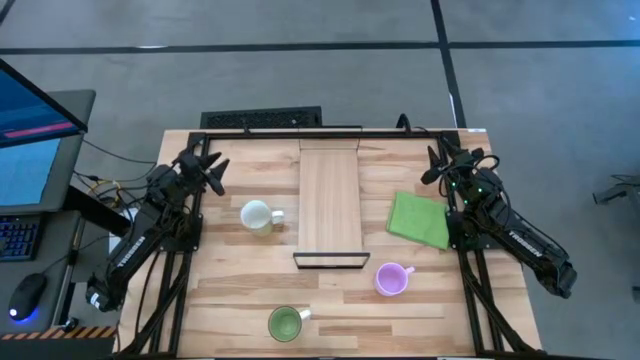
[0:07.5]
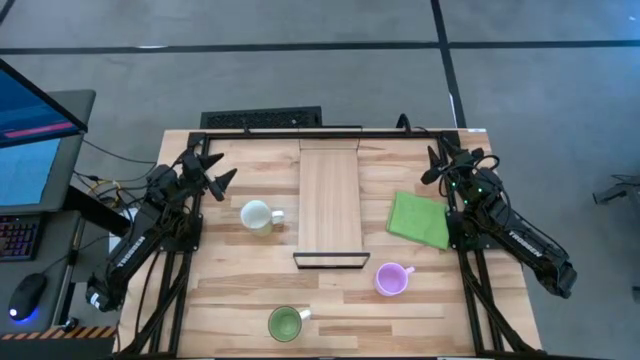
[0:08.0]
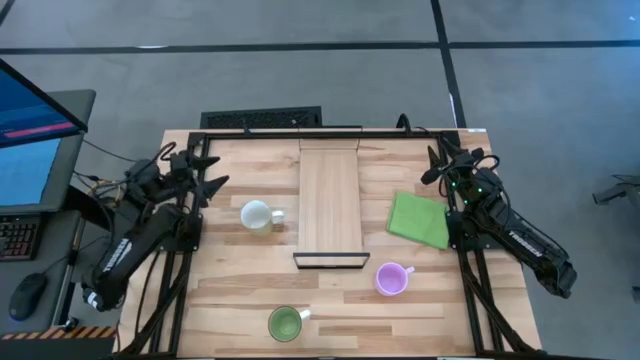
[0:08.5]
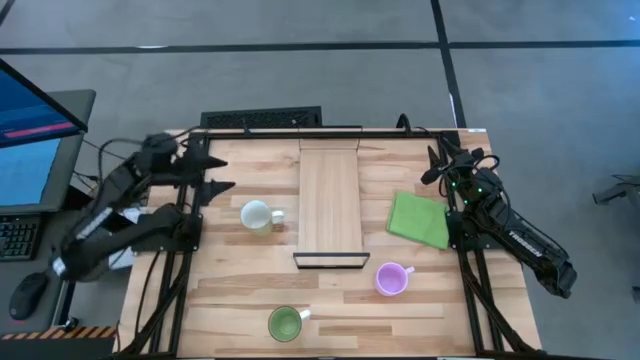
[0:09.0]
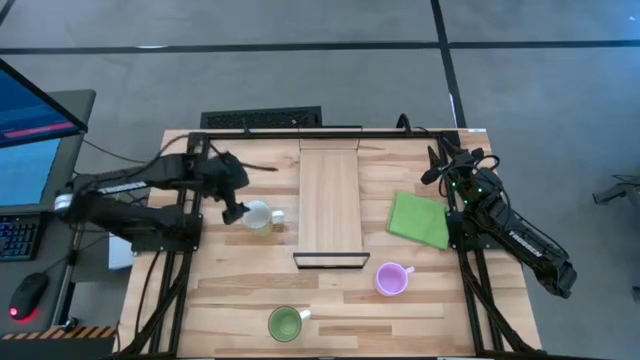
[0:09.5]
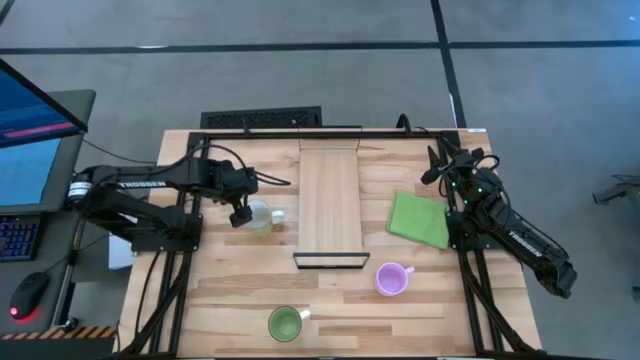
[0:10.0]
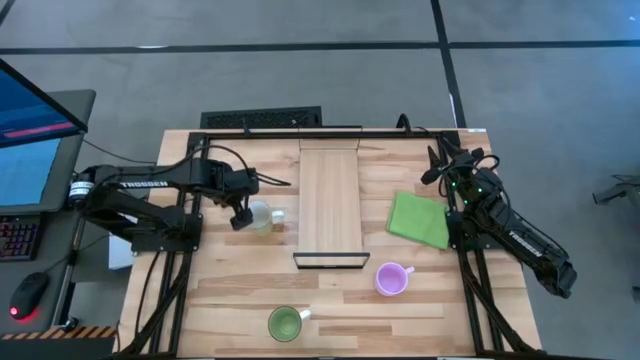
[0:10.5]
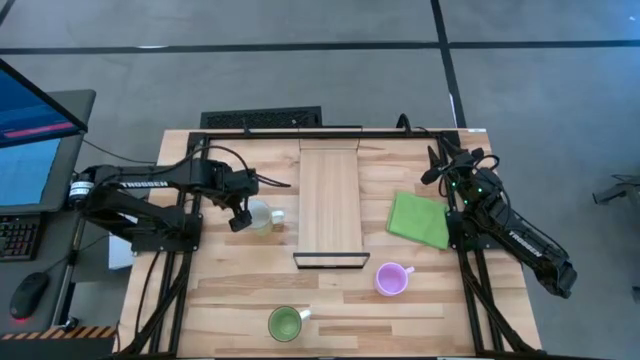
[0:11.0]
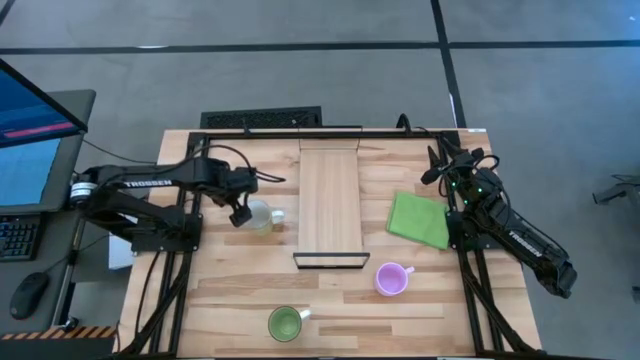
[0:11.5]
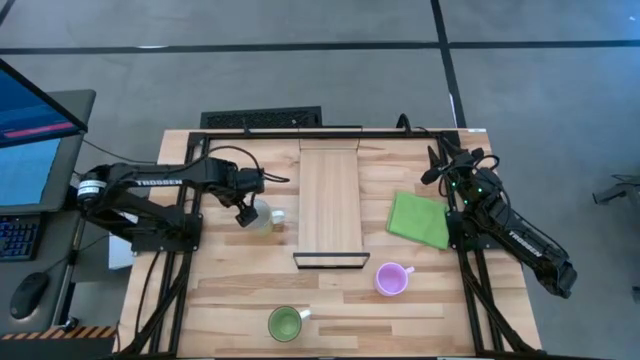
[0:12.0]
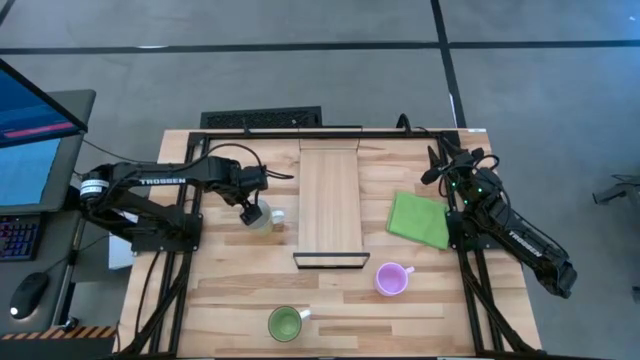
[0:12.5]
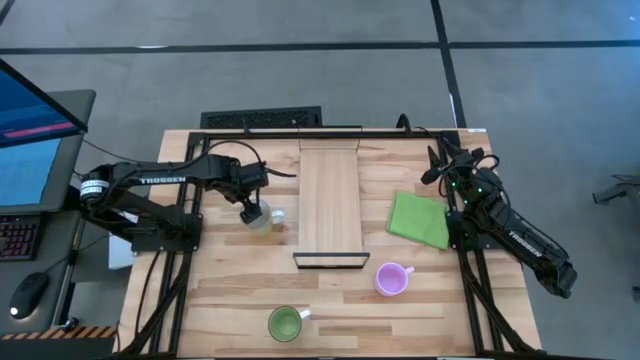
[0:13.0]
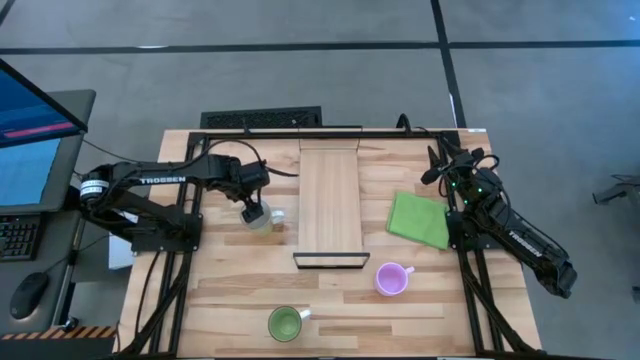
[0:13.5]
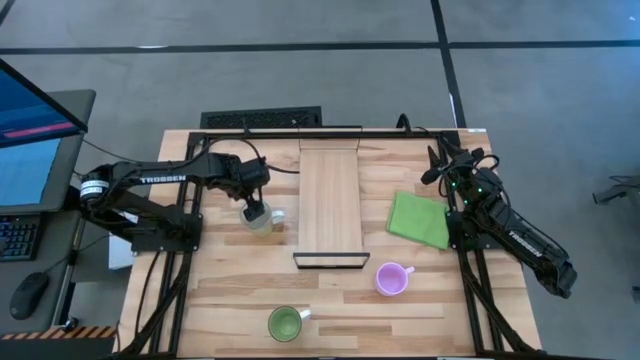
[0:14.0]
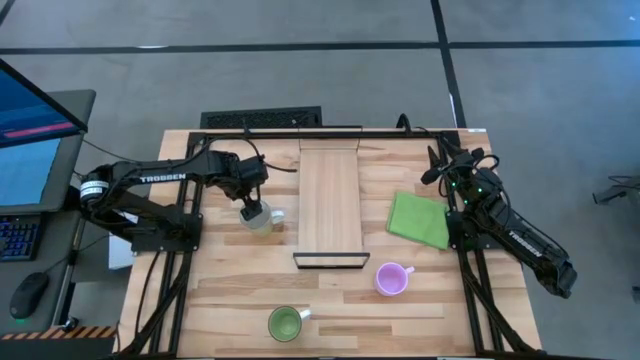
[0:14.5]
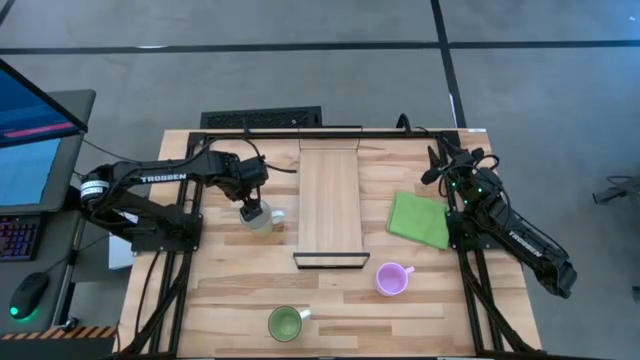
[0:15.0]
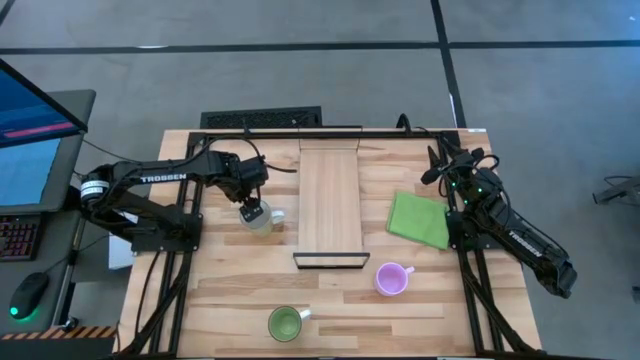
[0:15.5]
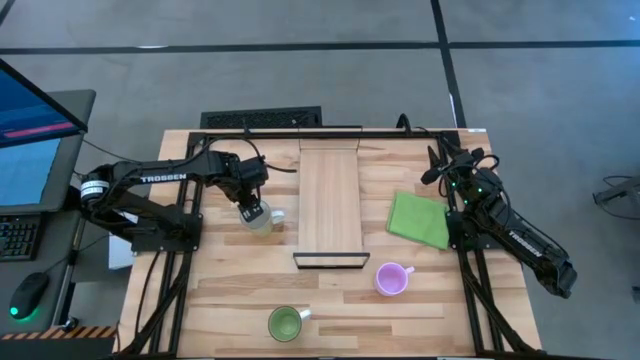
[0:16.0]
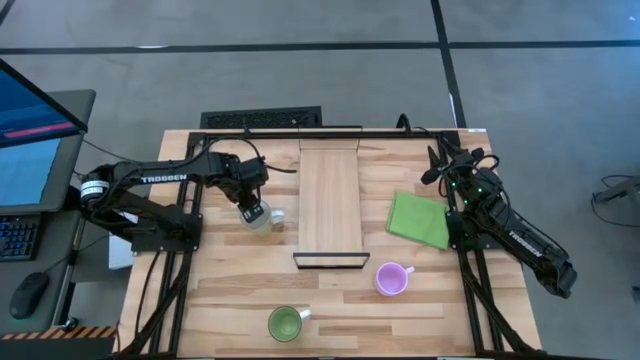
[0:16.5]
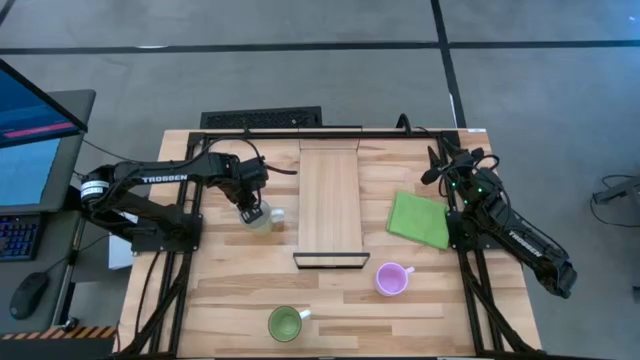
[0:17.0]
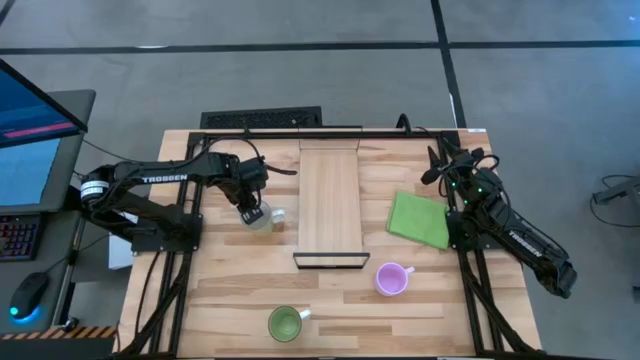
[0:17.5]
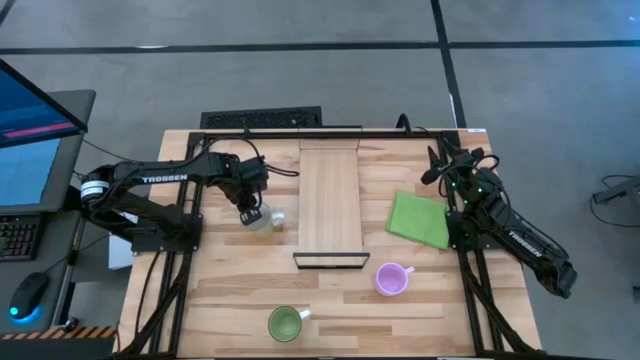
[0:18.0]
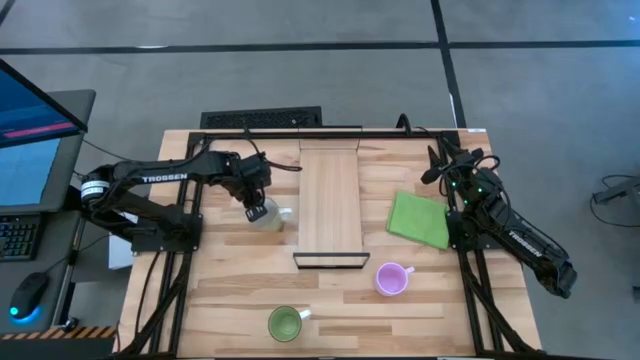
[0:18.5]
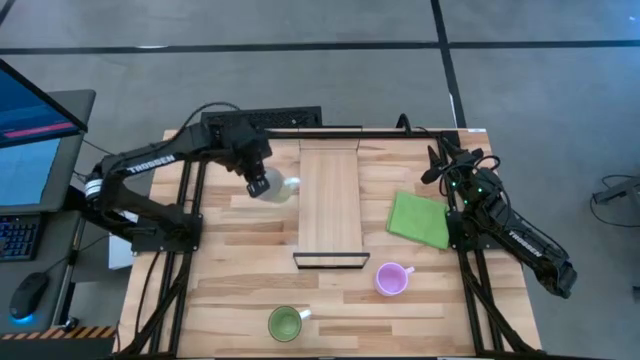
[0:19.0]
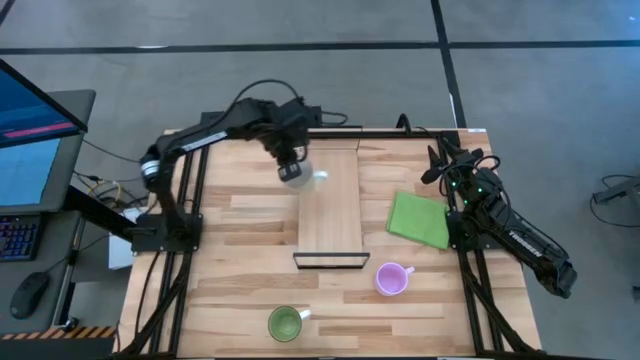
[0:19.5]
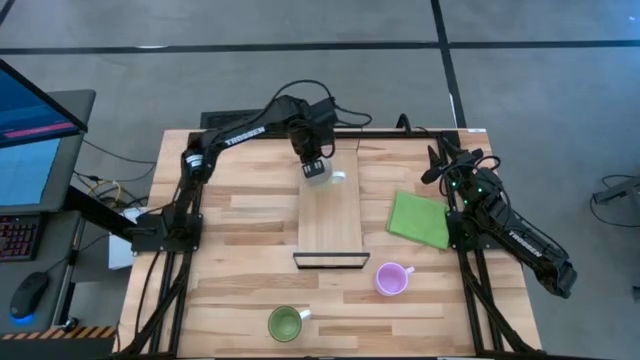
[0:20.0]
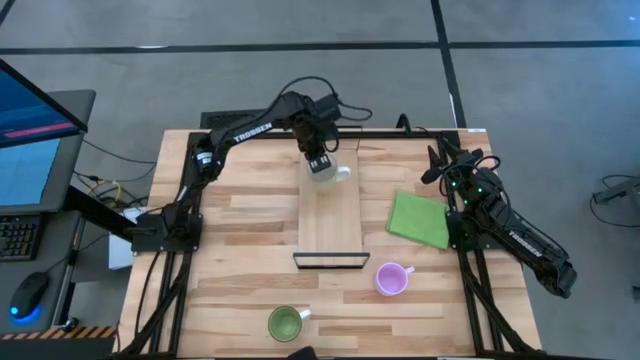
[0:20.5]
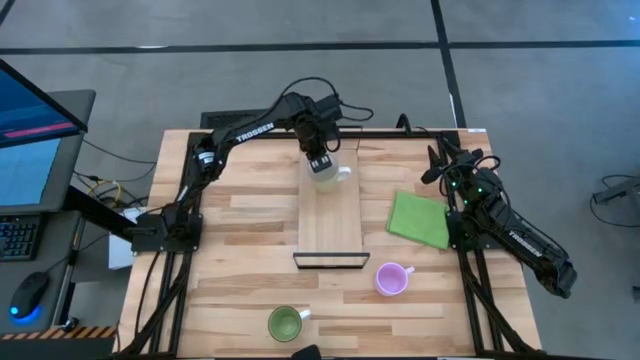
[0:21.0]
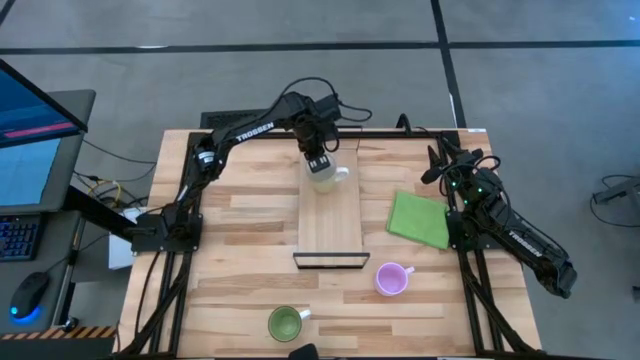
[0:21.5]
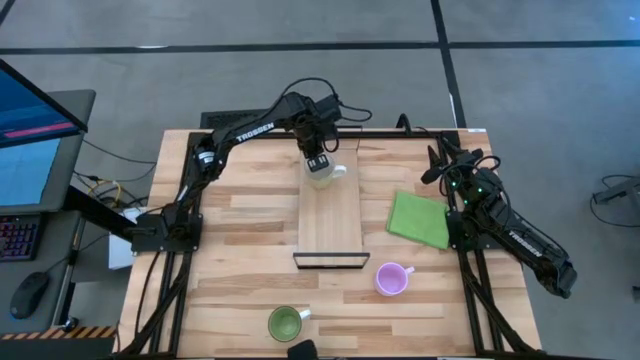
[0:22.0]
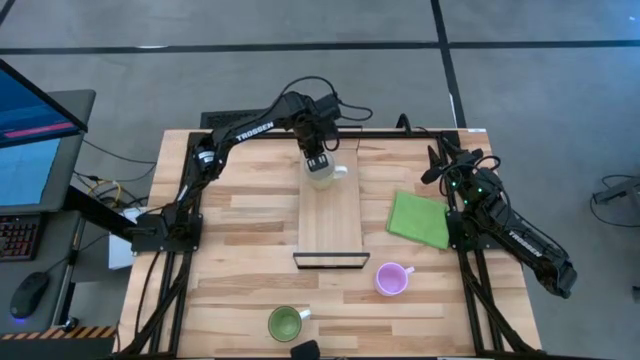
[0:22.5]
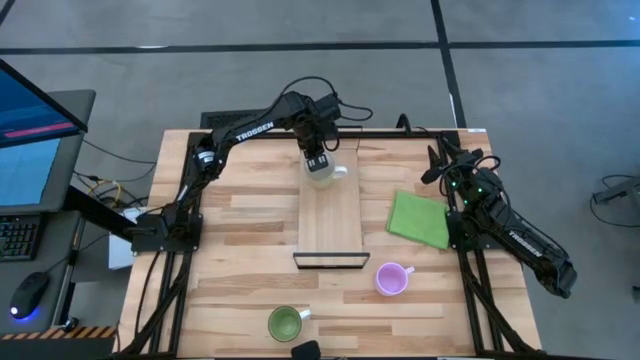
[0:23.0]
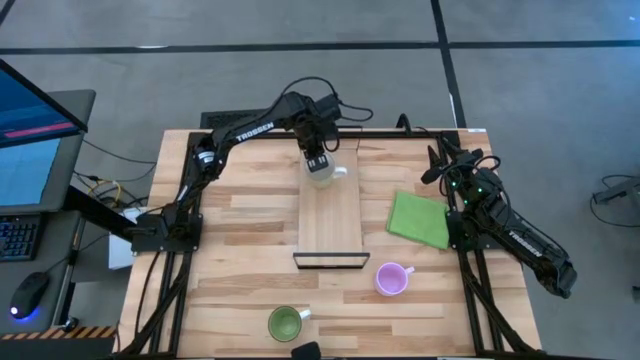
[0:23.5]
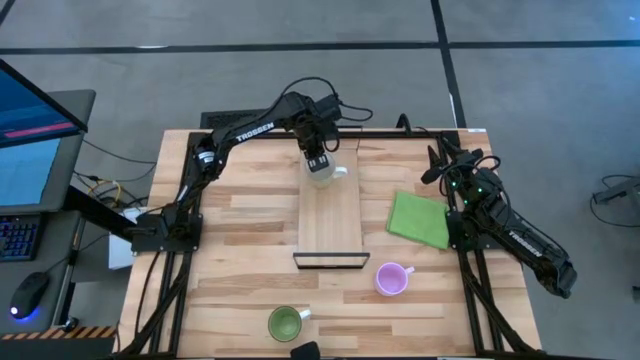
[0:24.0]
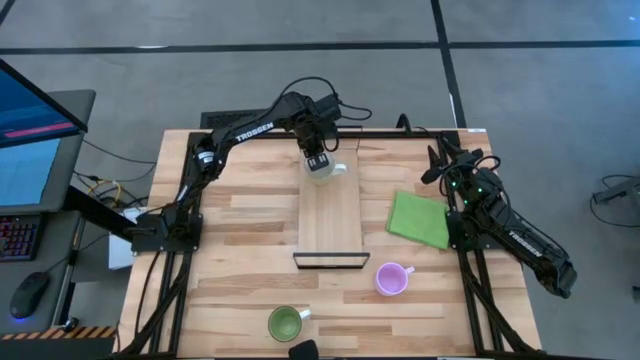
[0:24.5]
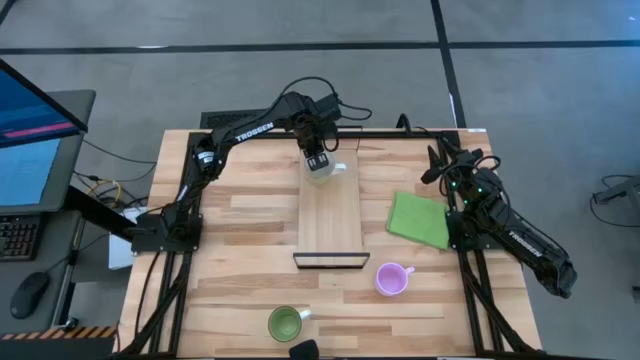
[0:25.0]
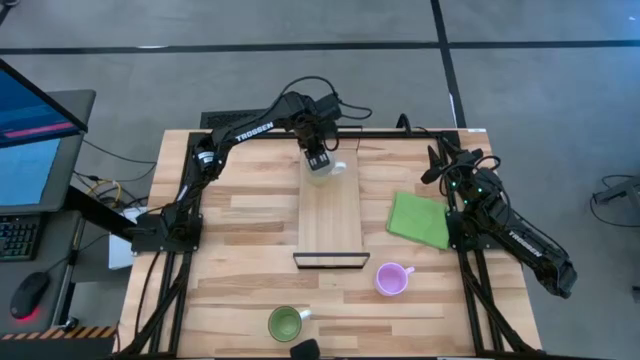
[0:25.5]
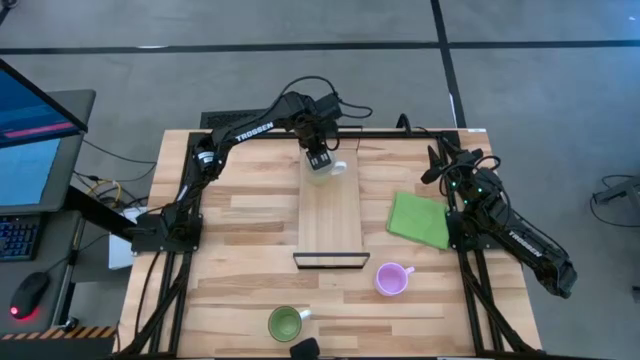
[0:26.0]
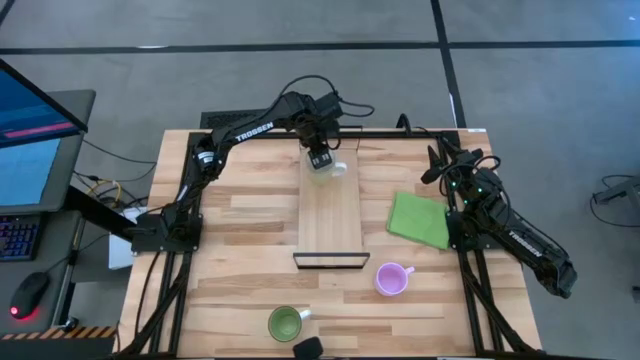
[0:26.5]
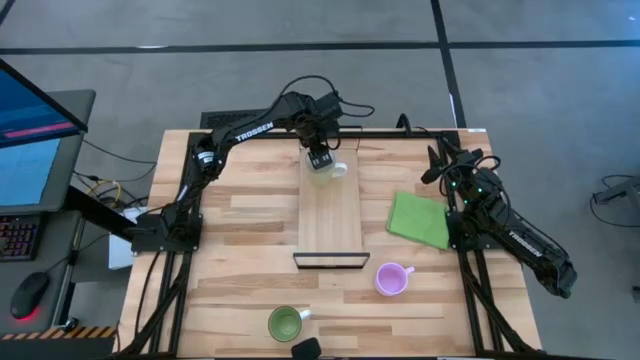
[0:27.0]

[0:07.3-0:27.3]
Task: Stack small to large cups/mugs on shelf
Put the yellow mug on the shelf
